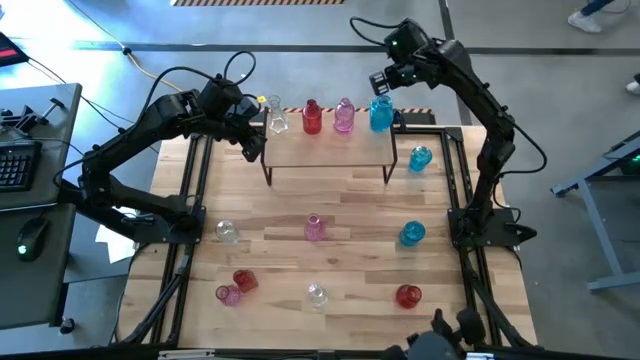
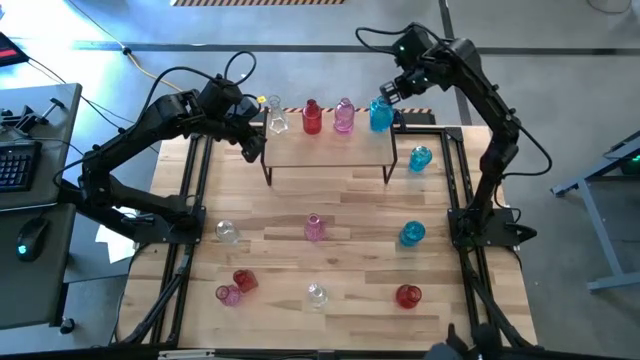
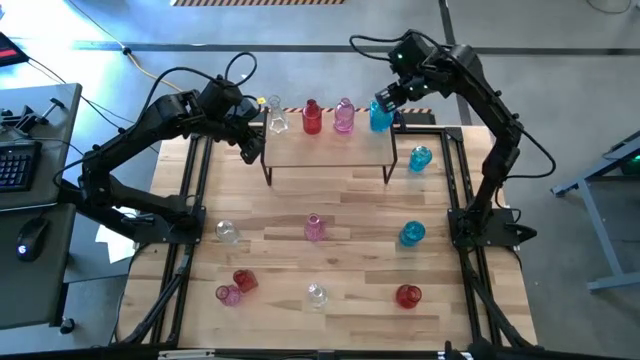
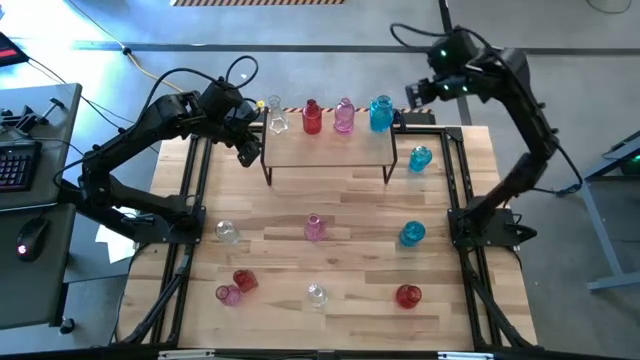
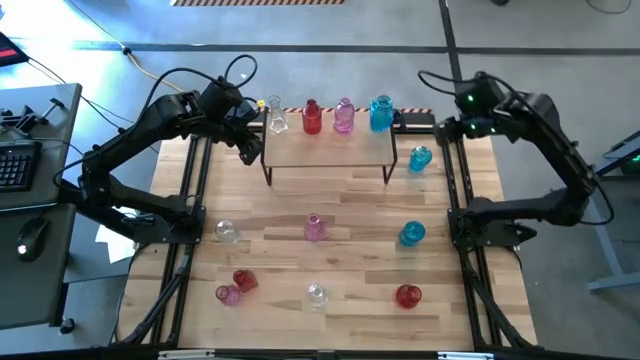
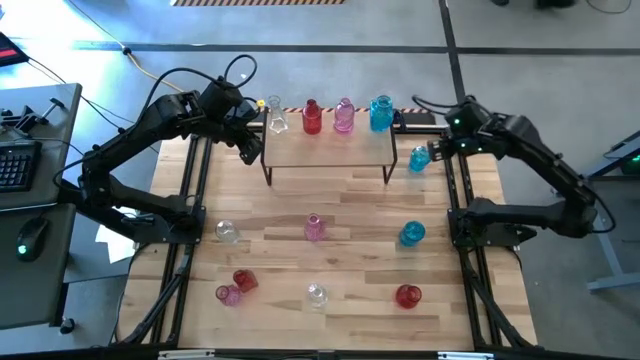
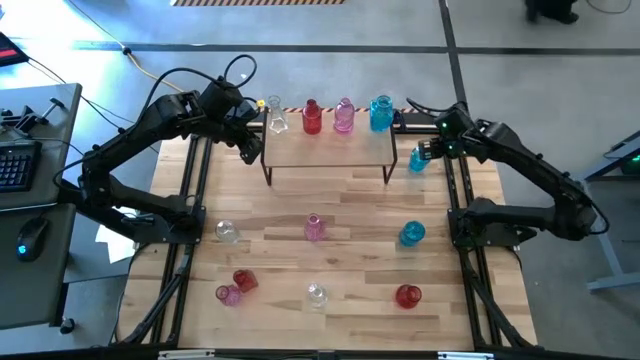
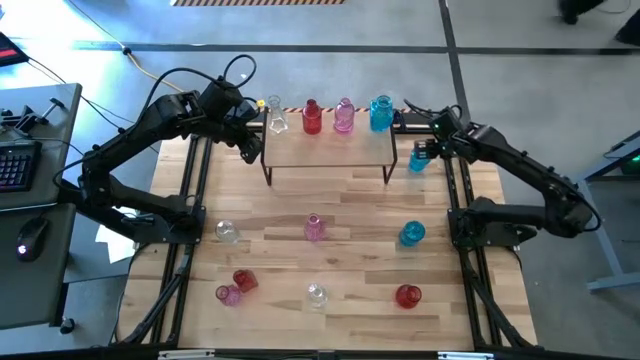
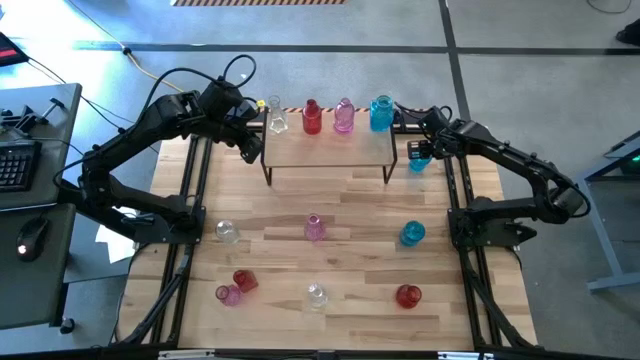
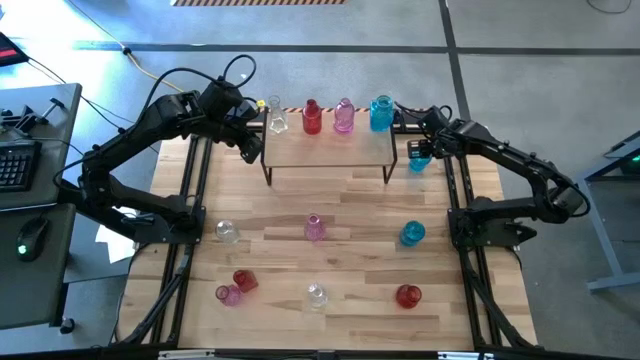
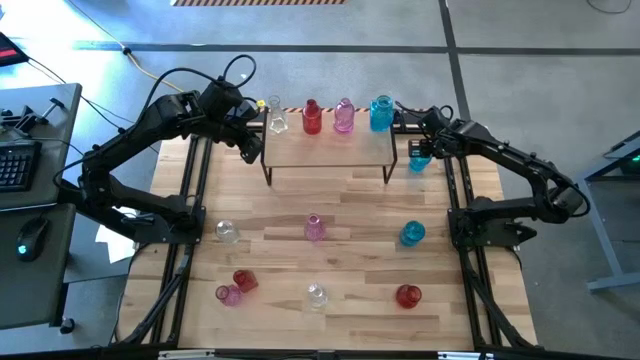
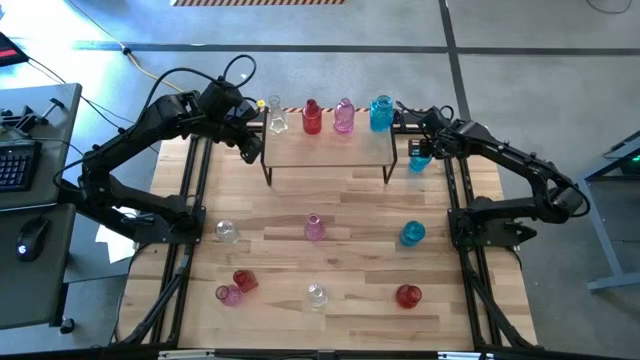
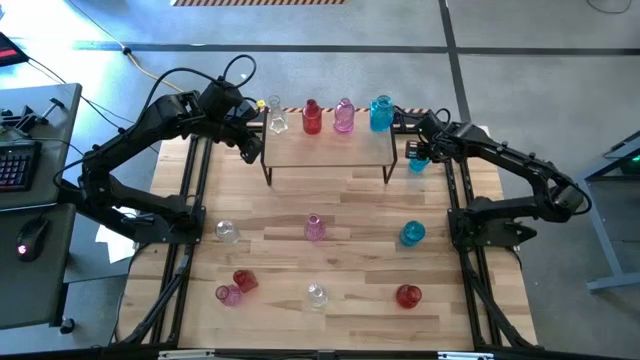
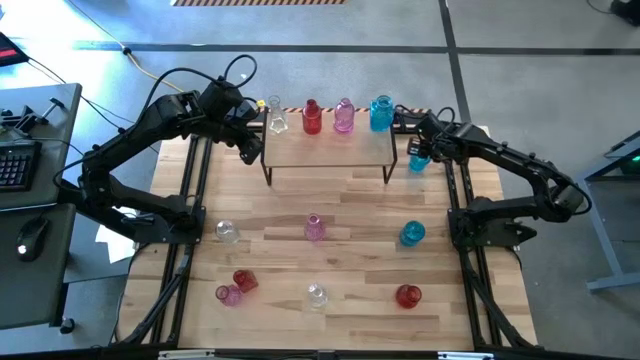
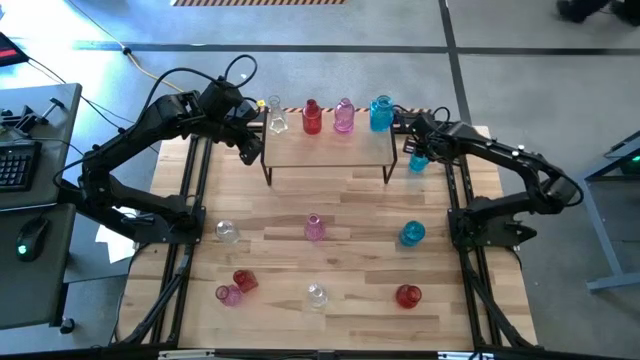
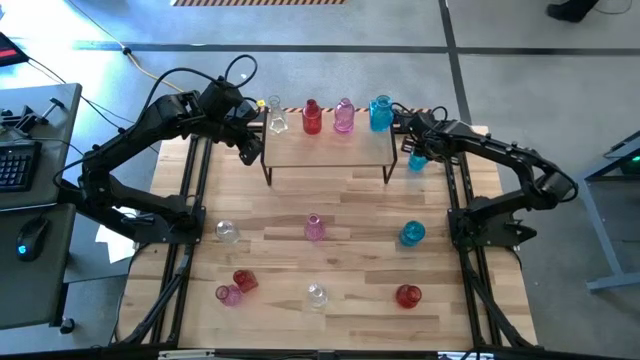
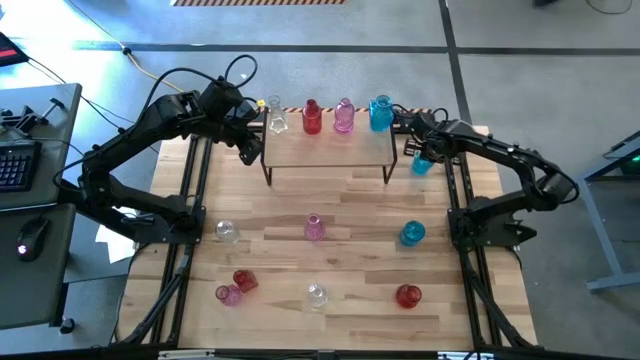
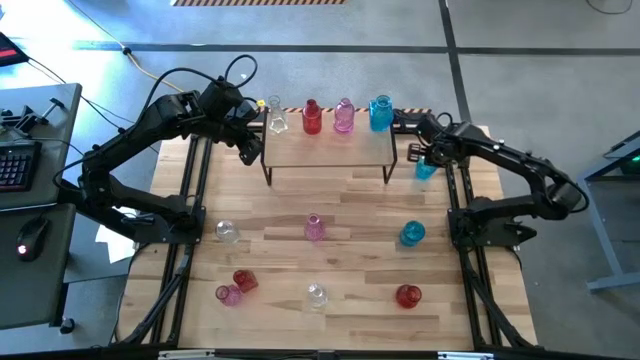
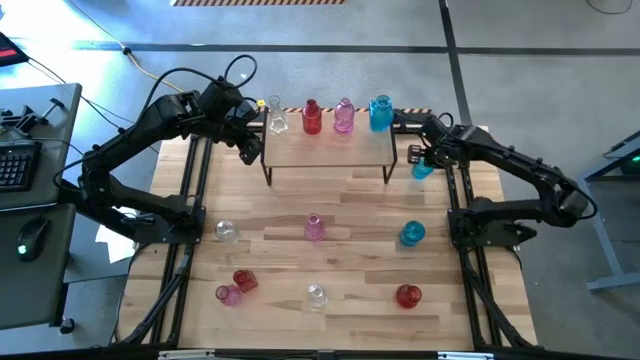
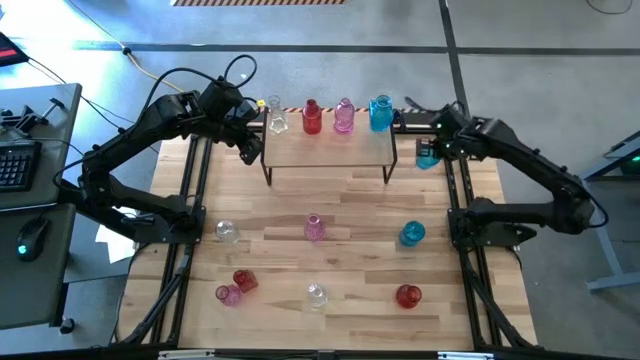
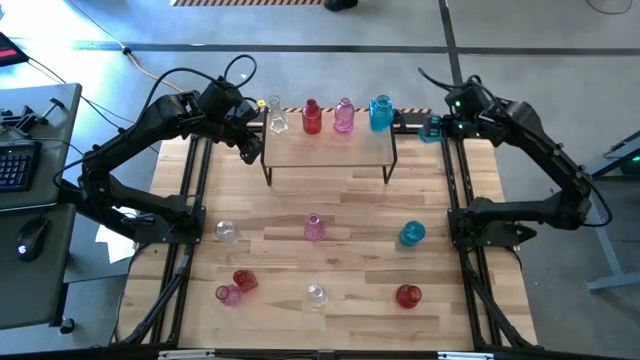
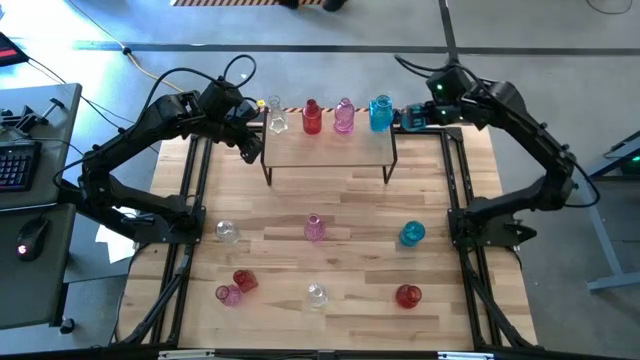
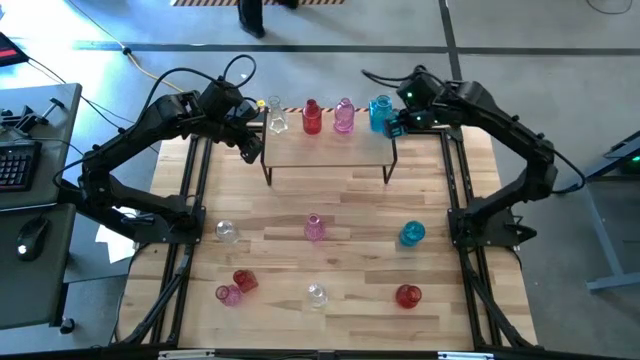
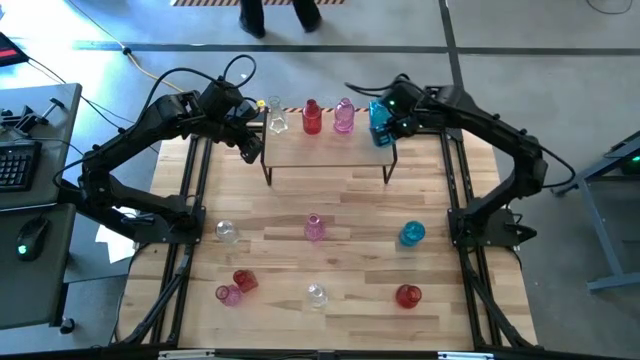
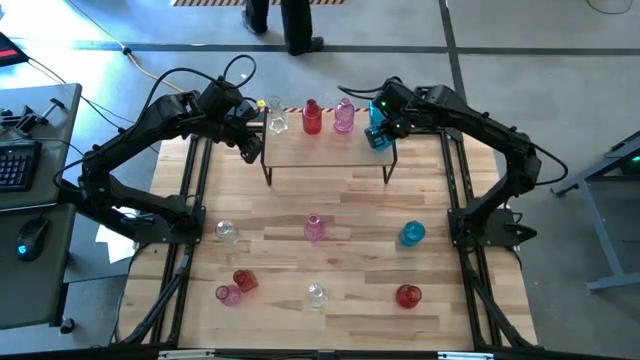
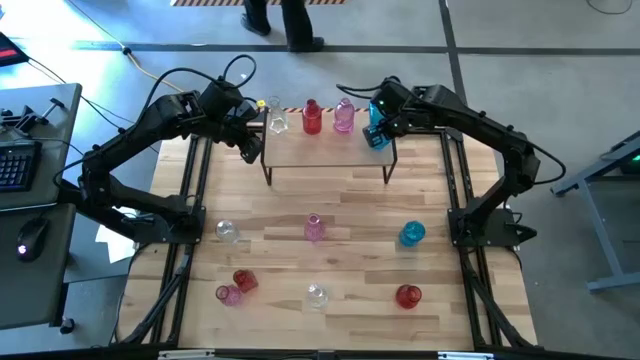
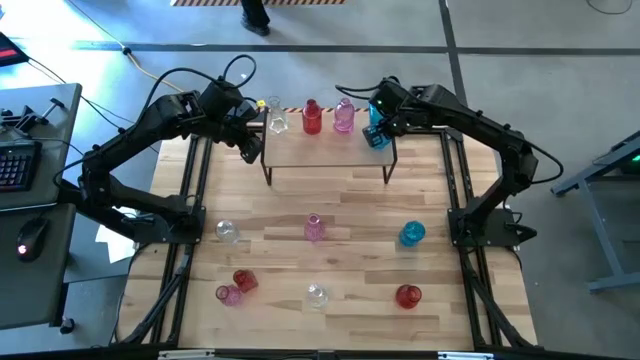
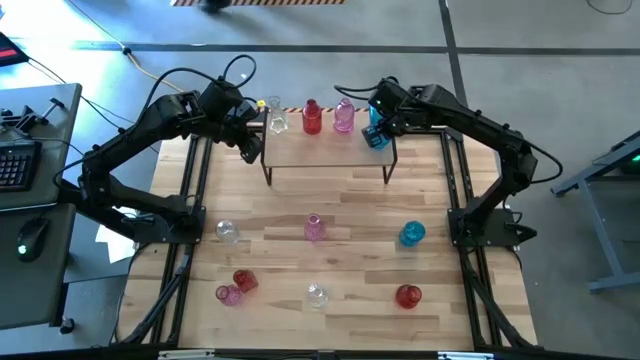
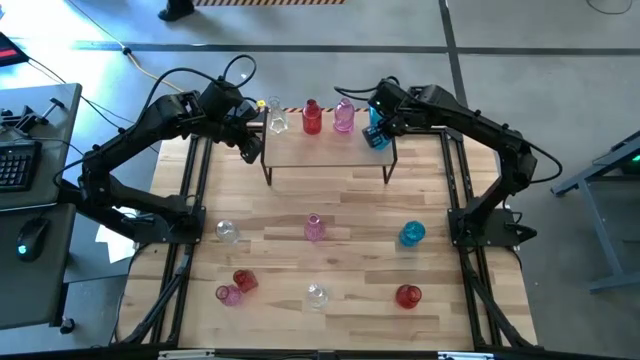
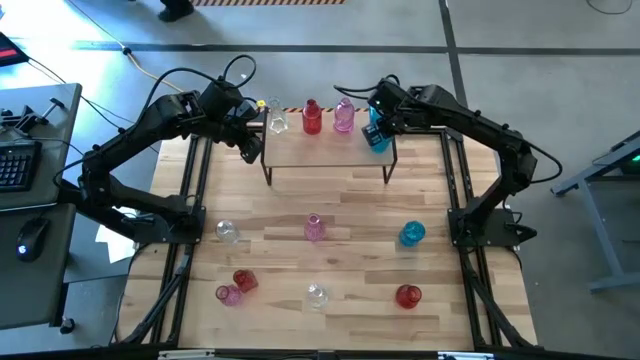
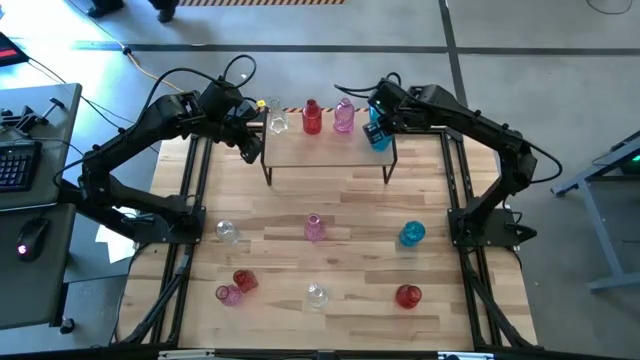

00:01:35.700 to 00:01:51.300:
Task: sort vases onto shelf
Put the top blue vase on the shelf aligned with the other blue vase
